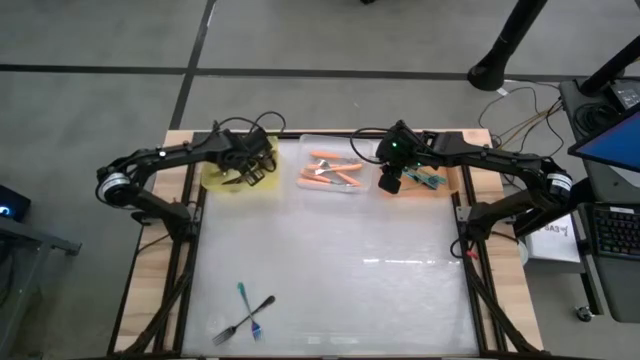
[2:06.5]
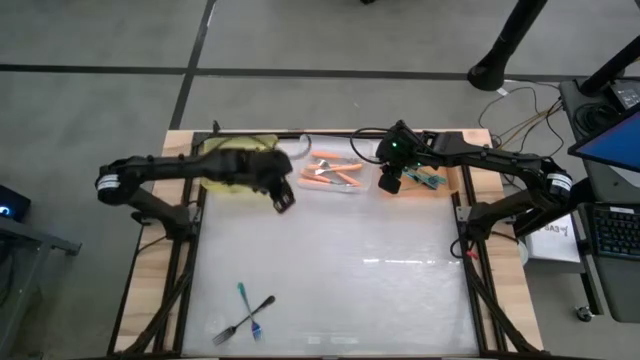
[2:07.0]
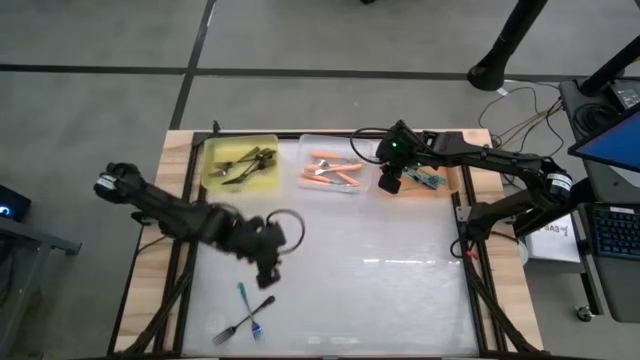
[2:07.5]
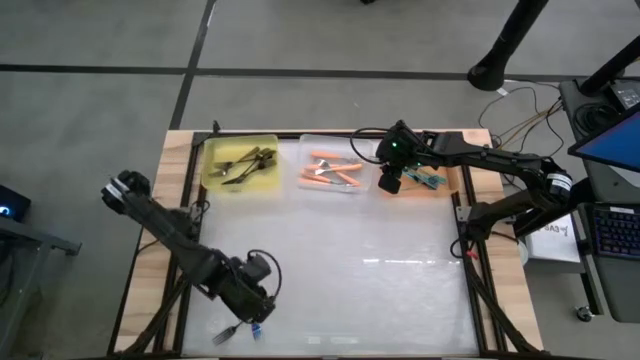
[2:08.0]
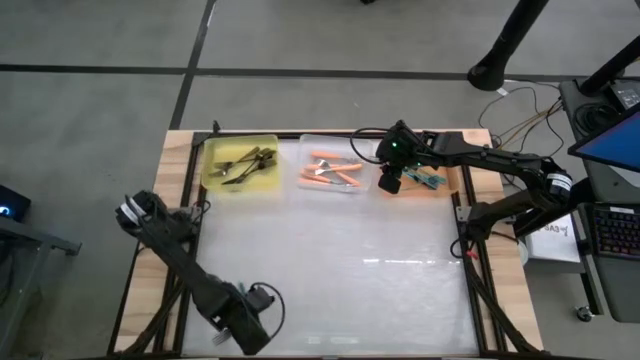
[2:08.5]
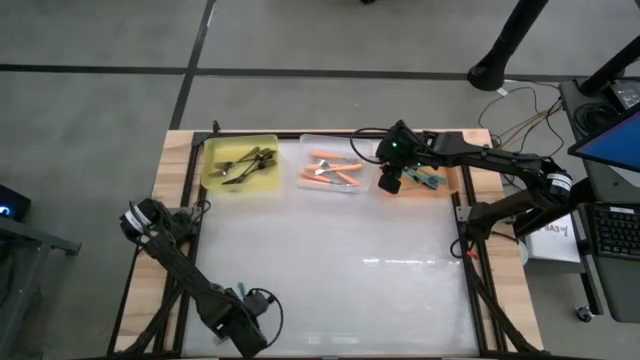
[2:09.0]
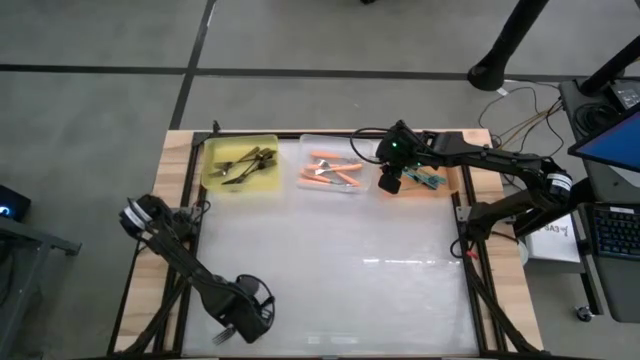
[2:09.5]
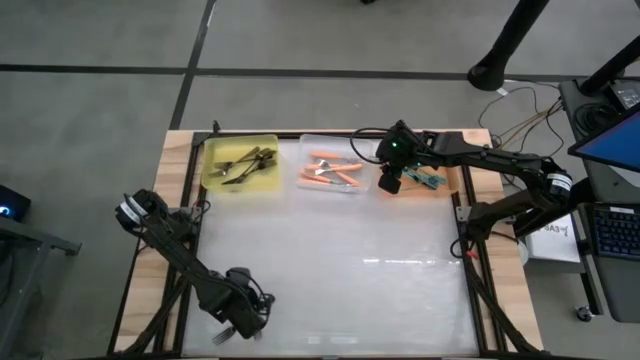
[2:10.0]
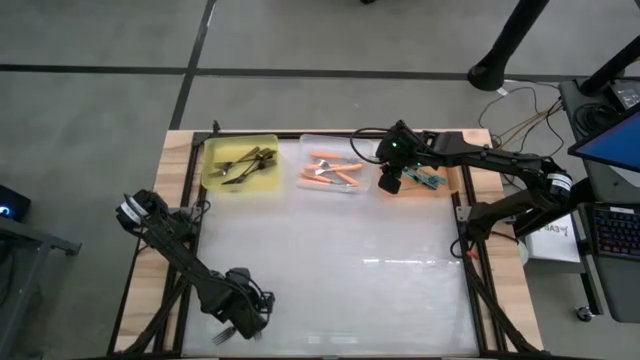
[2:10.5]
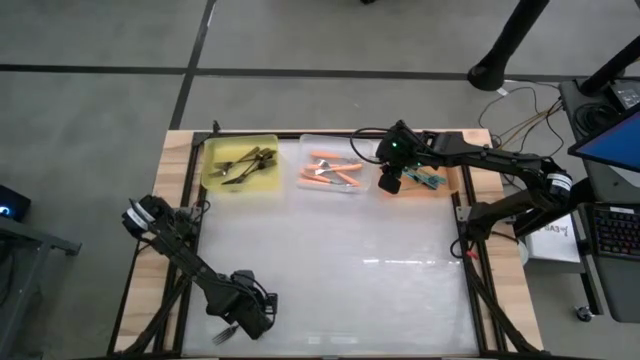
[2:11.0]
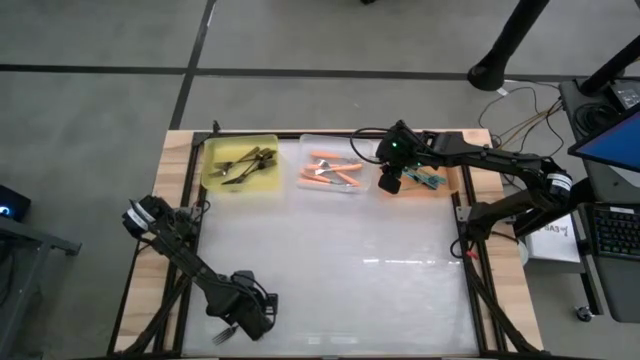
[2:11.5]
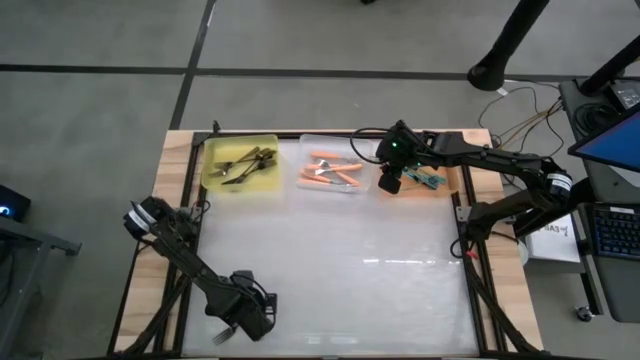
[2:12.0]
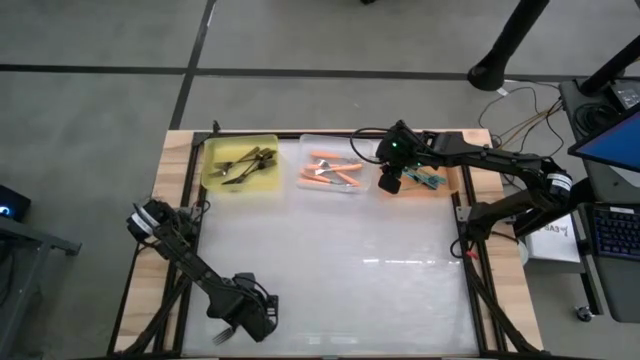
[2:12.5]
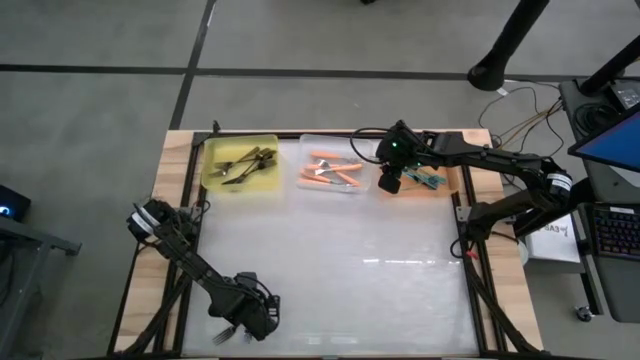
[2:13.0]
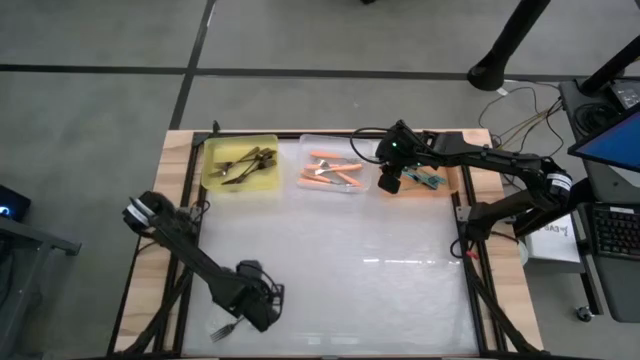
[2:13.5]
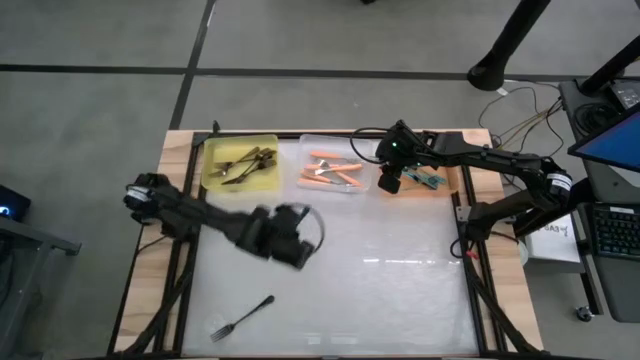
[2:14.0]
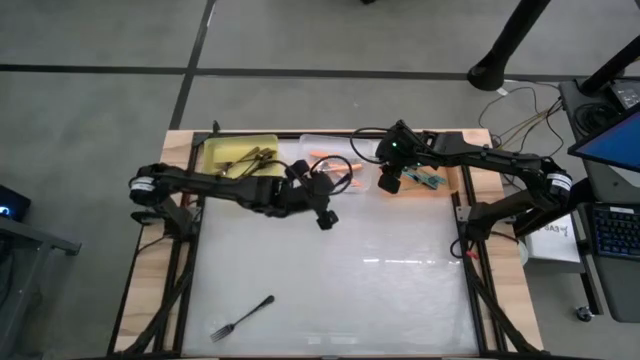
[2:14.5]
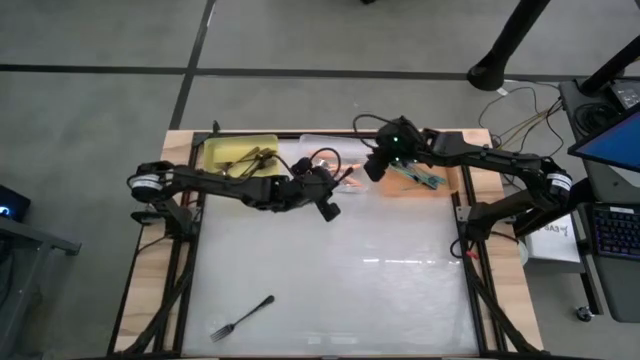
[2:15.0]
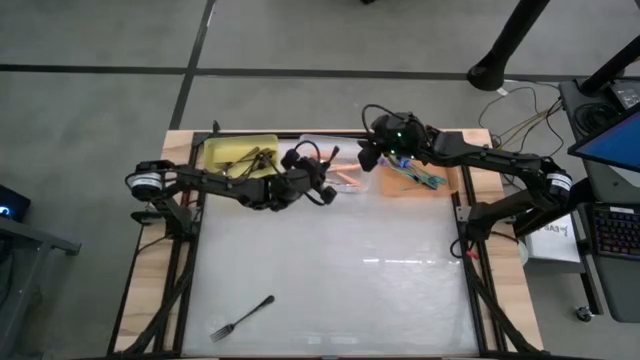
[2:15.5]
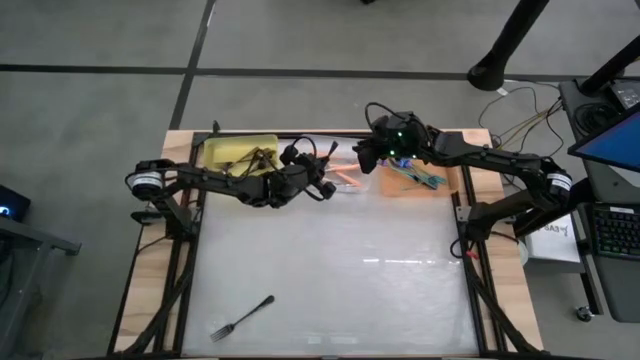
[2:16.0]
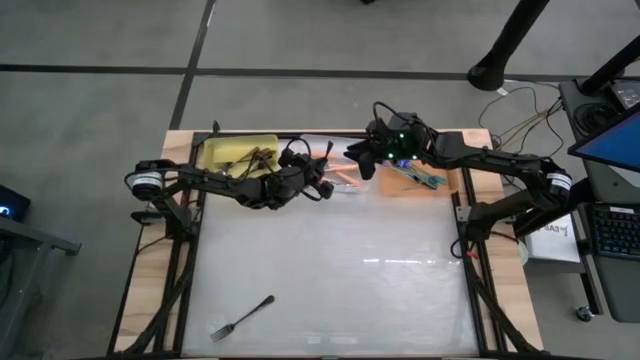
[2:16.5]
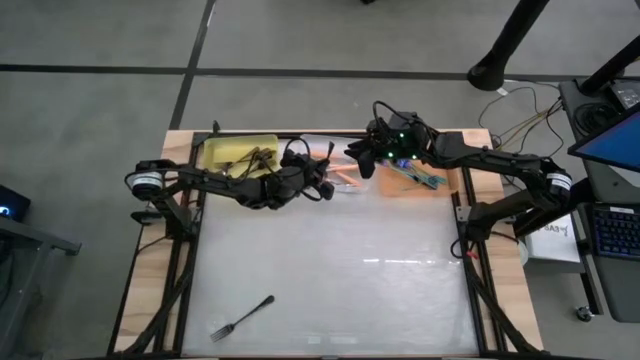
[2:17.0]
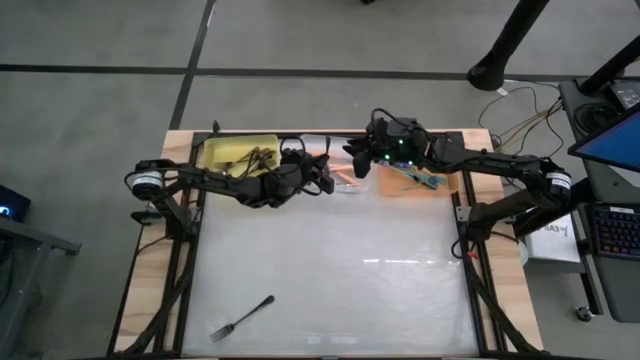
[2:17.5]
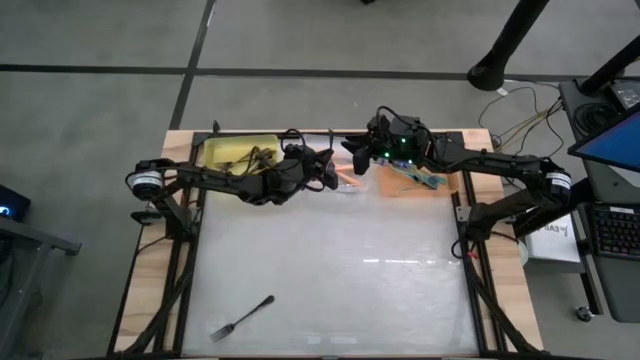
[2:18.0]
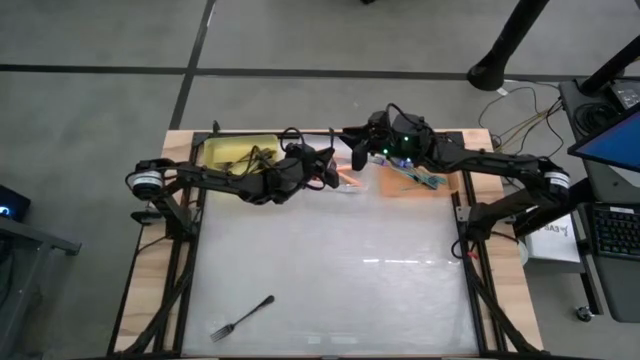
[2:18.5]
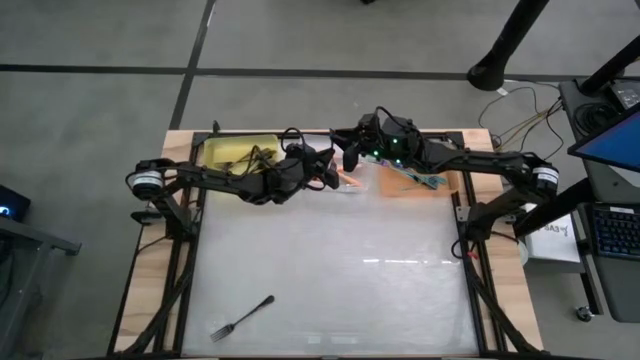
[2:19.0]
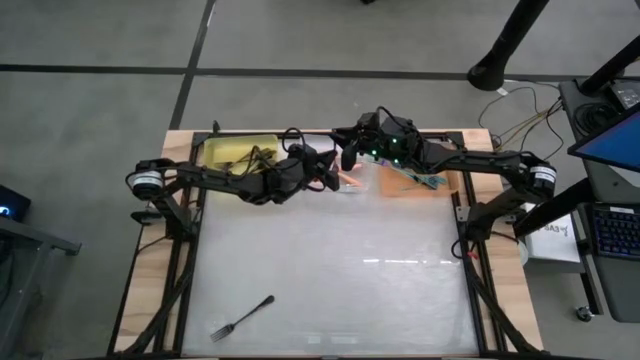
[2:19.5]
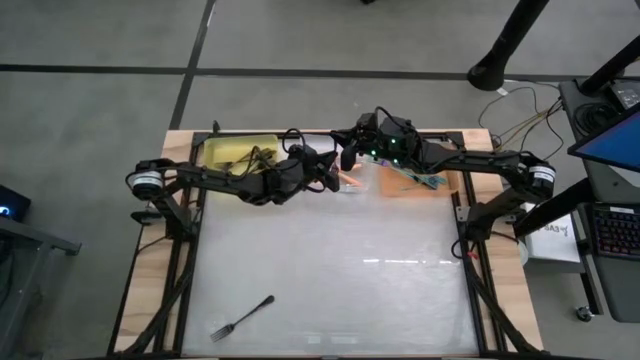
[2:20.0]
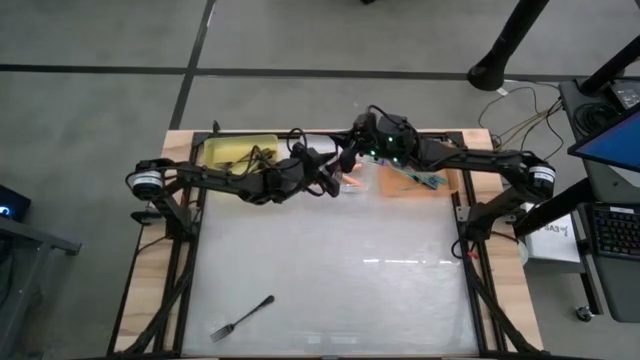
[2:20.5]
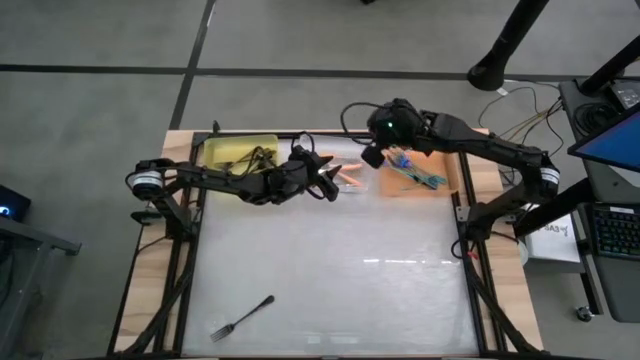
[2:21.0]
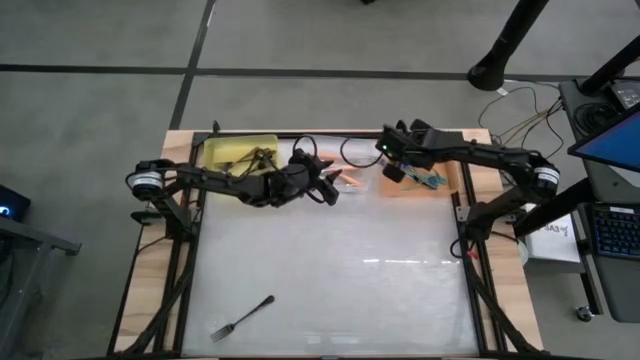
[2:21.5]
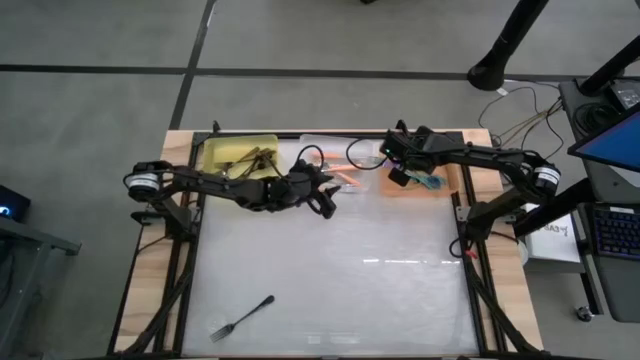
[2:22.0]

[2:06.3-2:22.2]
Task: Sort silverware by color (type)
Put the iridescent fork into the orange bin

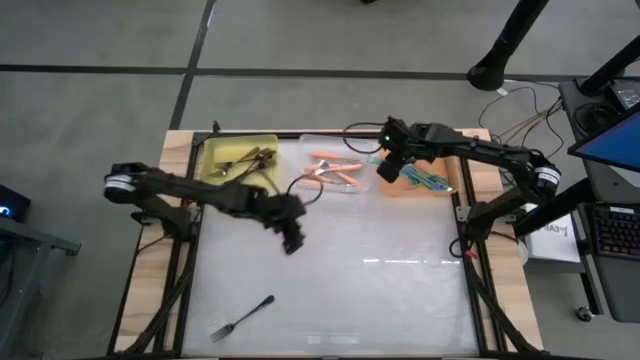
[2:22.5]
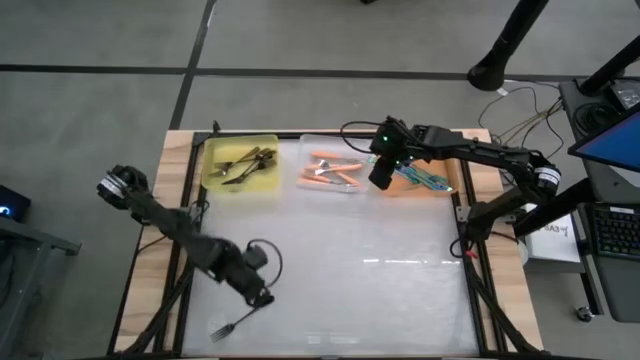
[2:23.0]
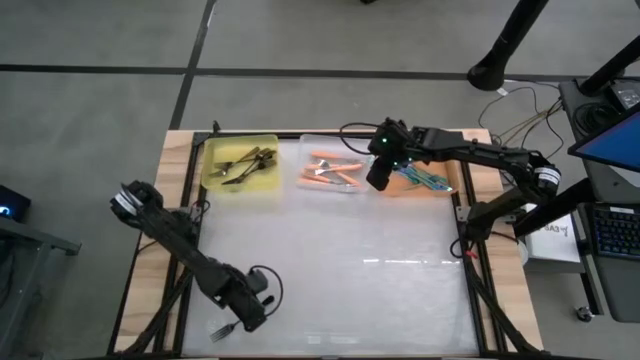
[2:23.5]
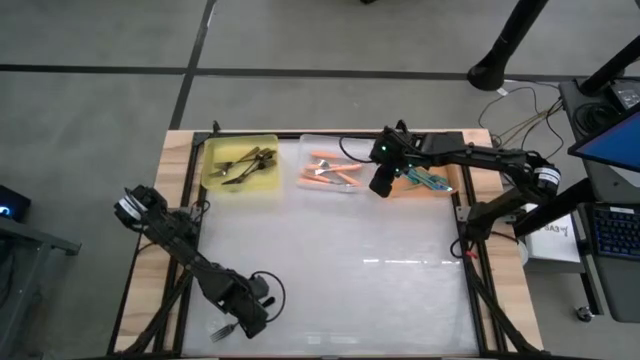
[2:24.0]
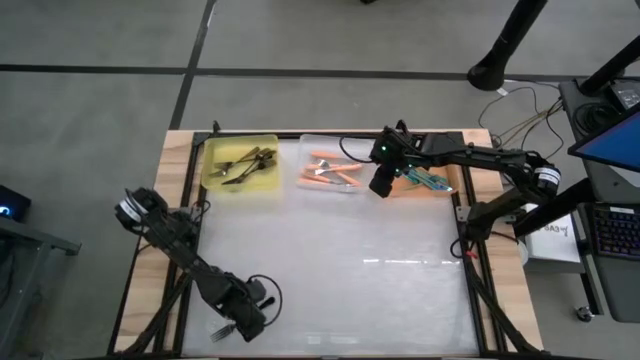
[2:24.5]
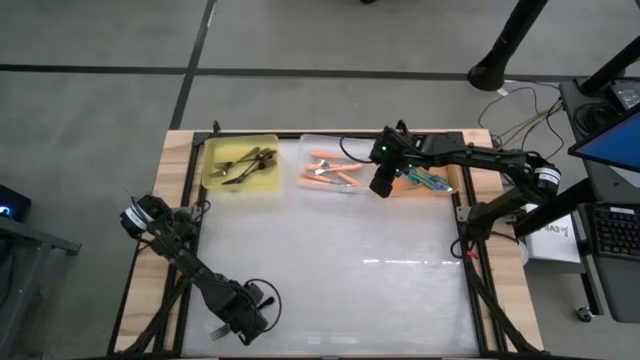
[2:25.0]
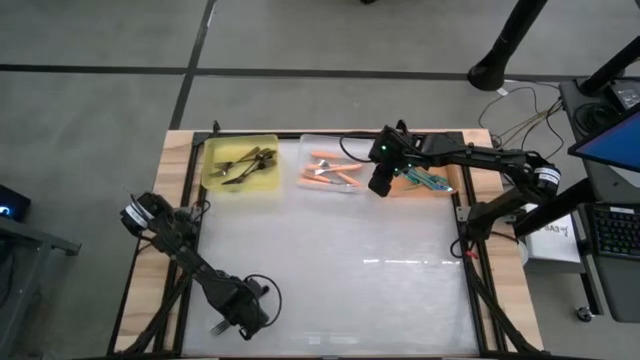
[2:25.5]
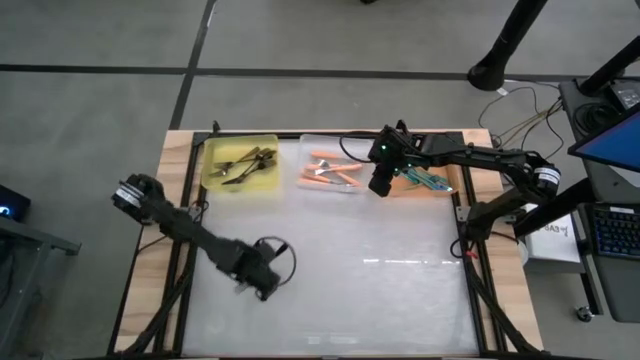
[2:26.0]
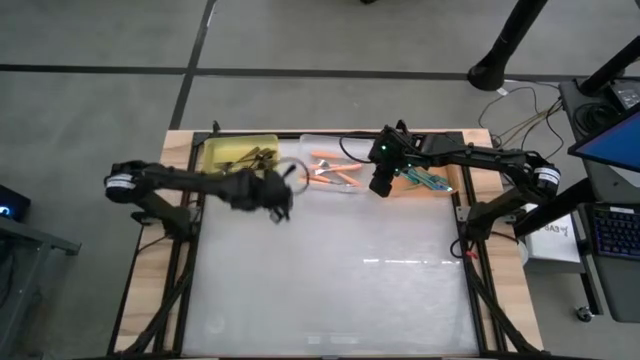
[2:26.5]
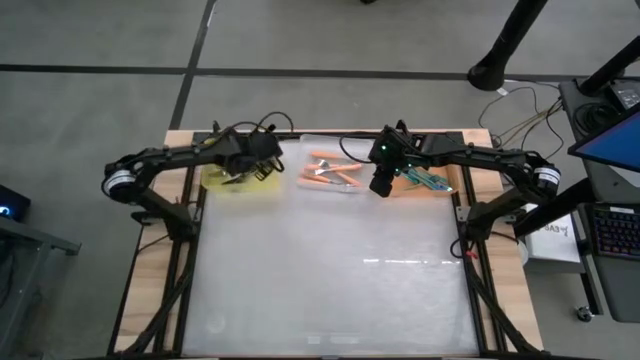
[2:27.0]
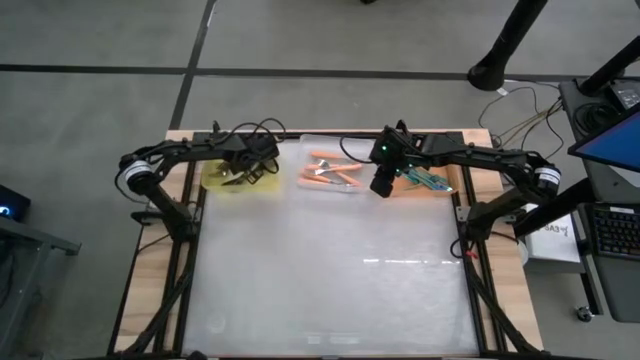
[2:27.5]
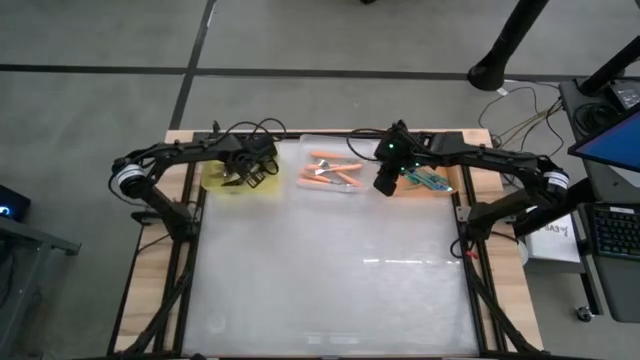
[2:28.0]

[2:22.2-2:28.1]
Put the black fork into the yellow bin
